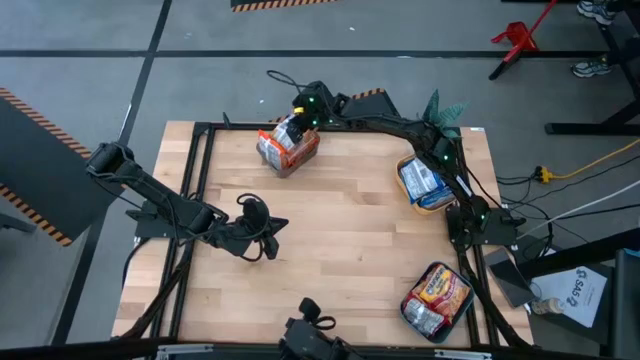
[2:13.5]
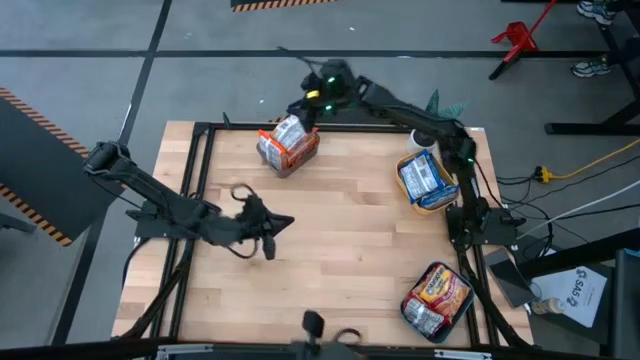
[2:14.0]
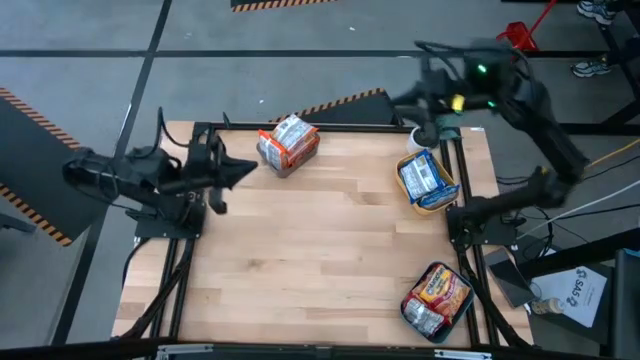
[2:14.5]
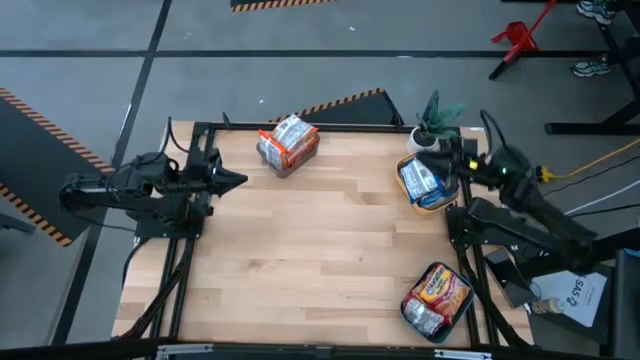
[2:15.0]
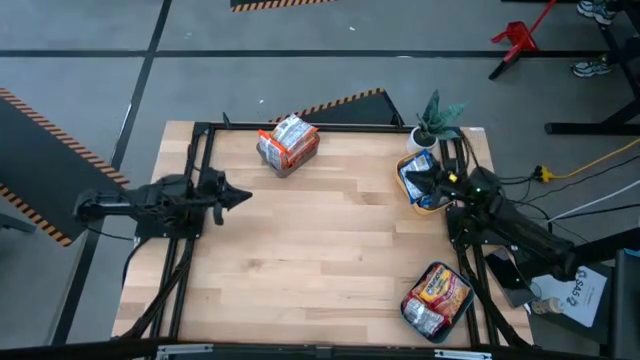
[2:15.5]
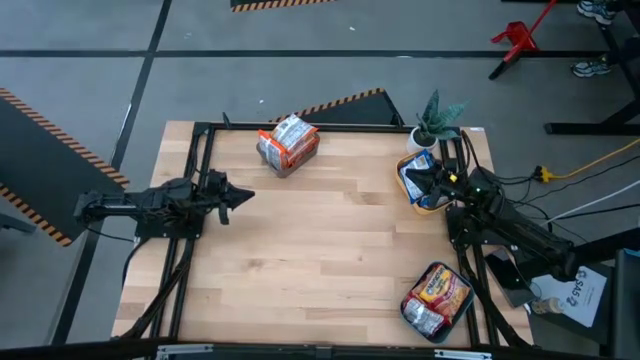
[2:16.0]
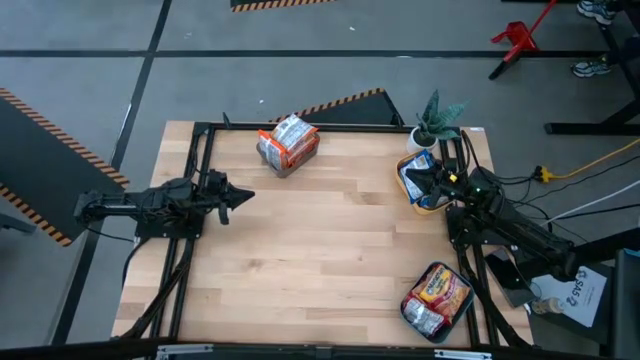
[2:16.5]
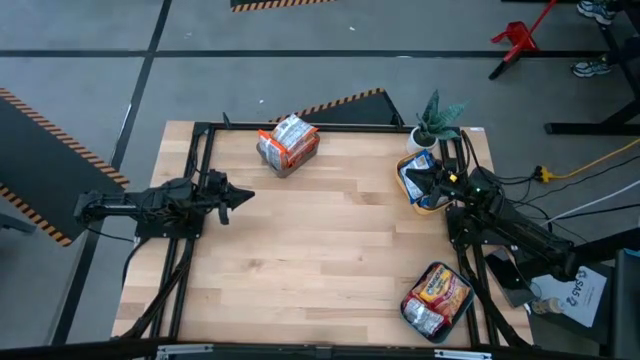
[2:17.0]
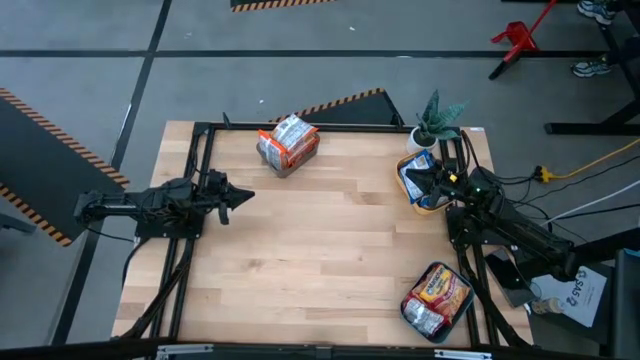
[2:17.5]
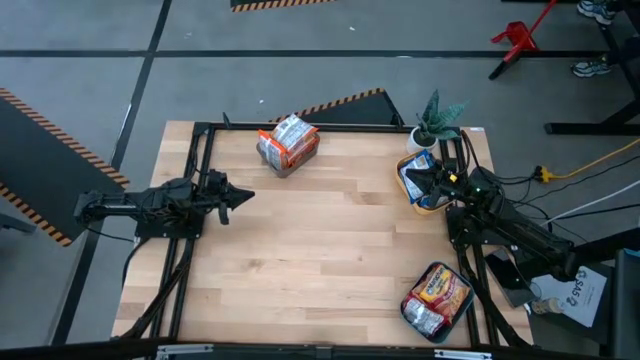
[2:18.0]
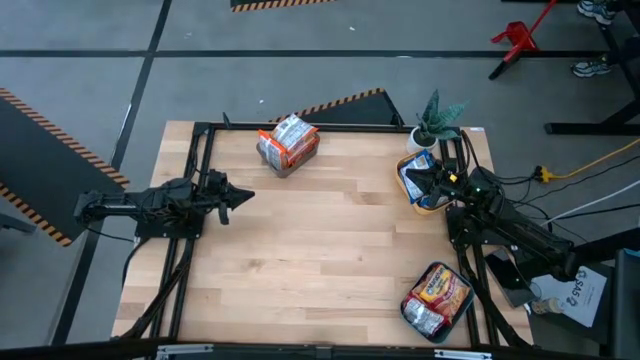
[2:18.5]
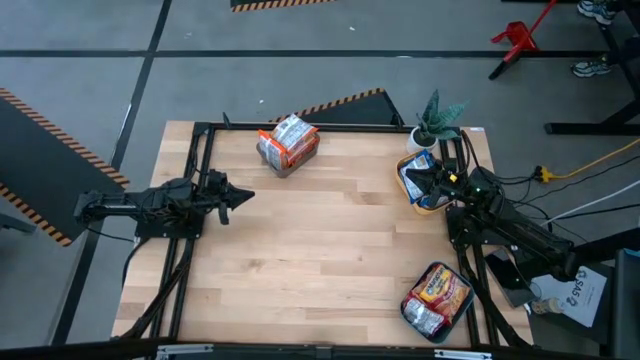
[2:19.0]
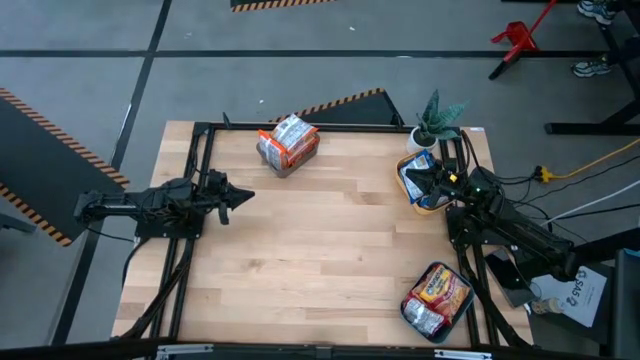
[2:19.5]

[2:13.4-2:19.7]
Task: Sort Maruchan noodles
Return to Home Position

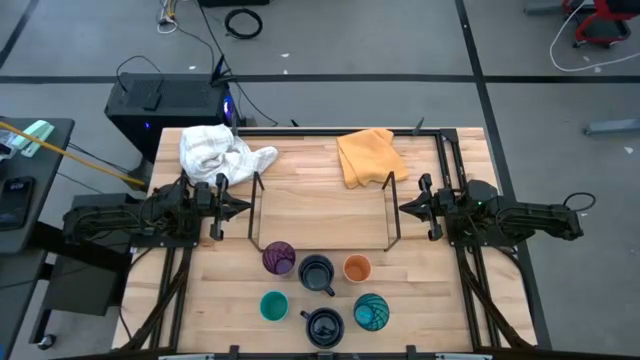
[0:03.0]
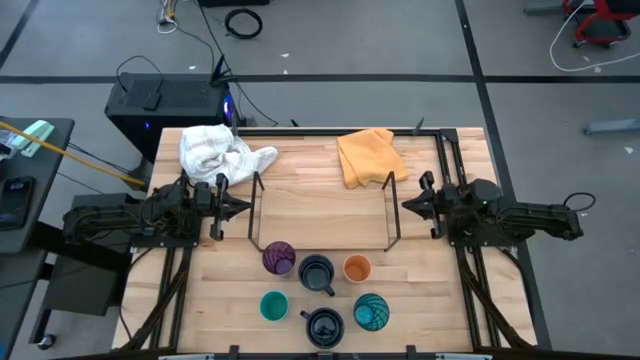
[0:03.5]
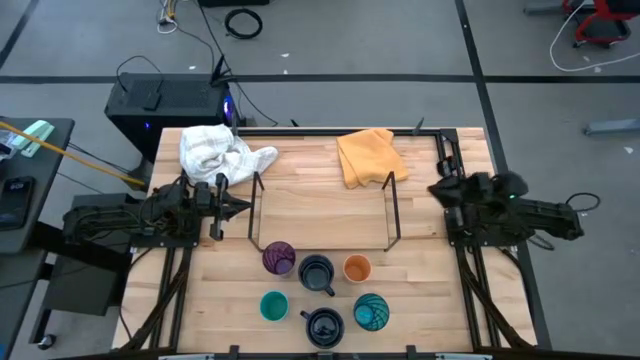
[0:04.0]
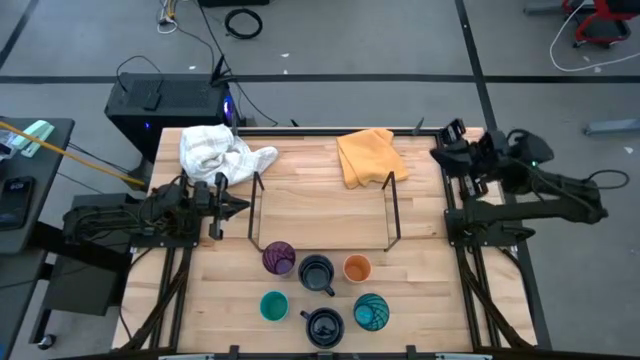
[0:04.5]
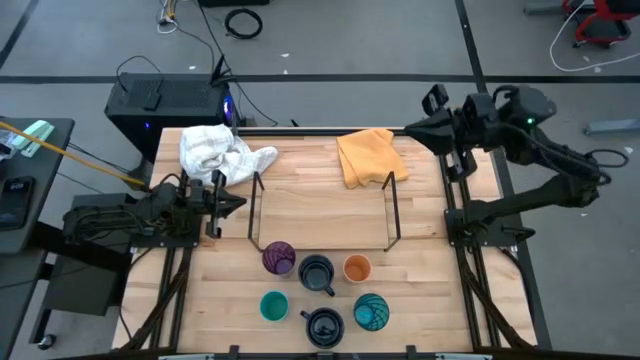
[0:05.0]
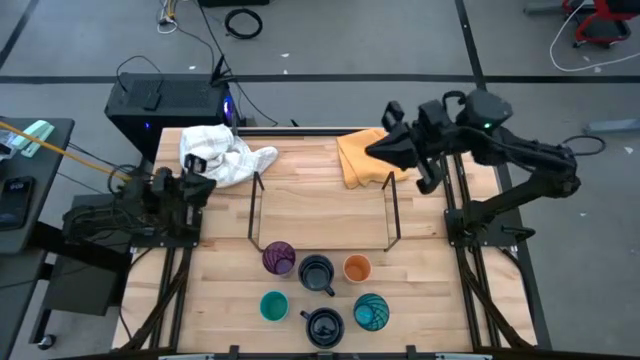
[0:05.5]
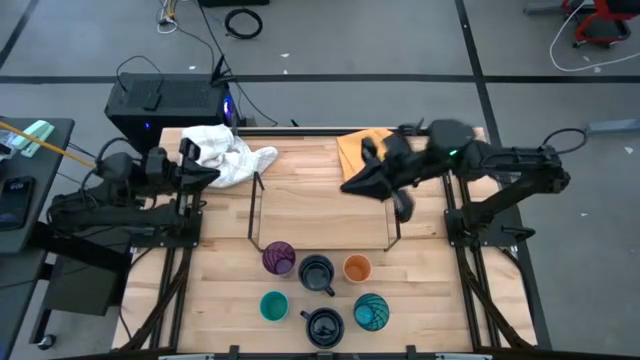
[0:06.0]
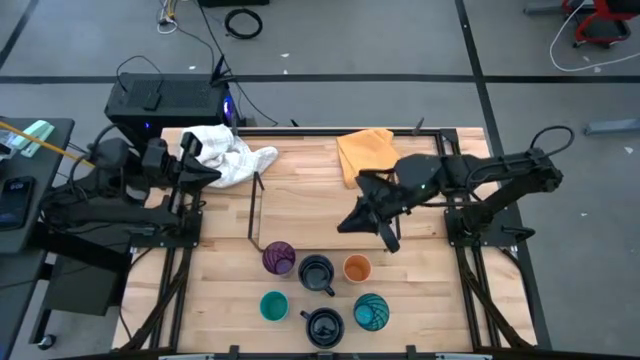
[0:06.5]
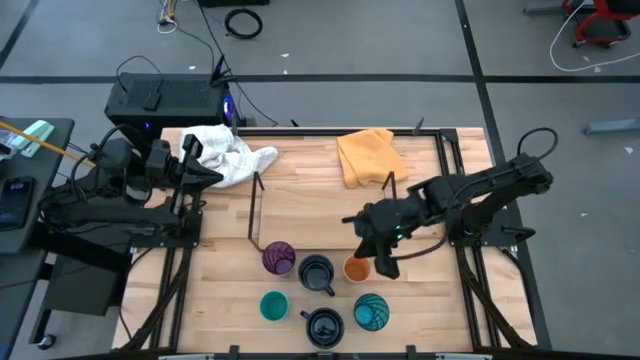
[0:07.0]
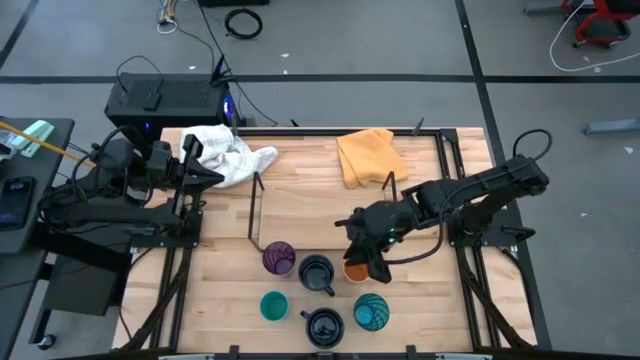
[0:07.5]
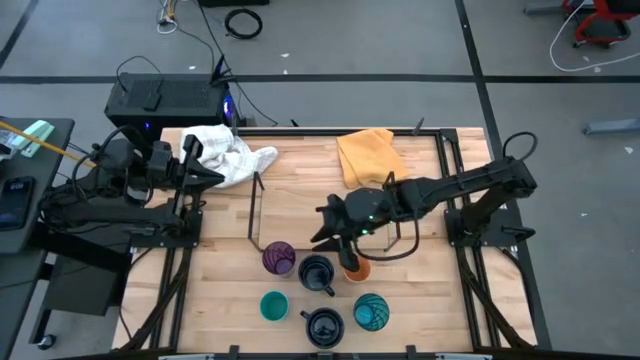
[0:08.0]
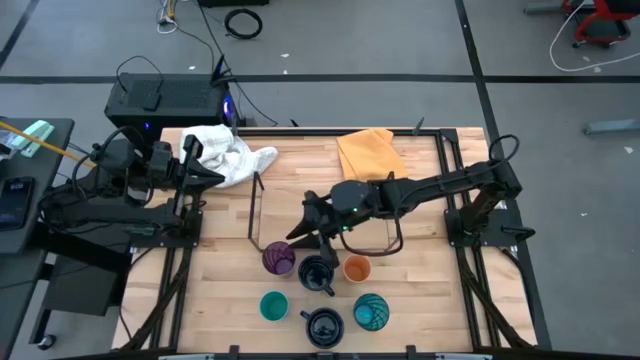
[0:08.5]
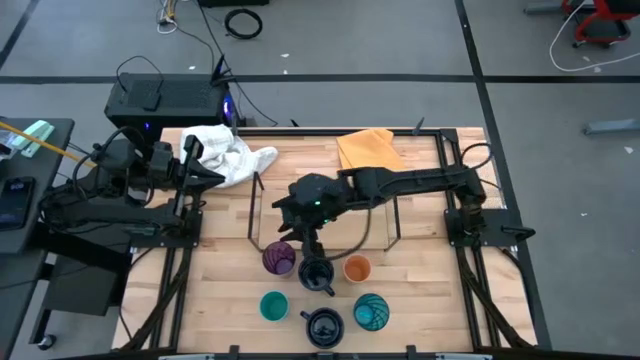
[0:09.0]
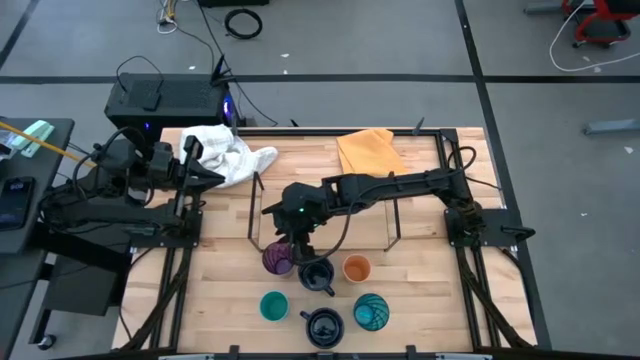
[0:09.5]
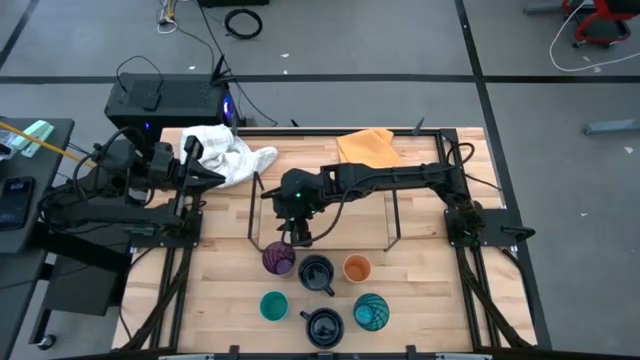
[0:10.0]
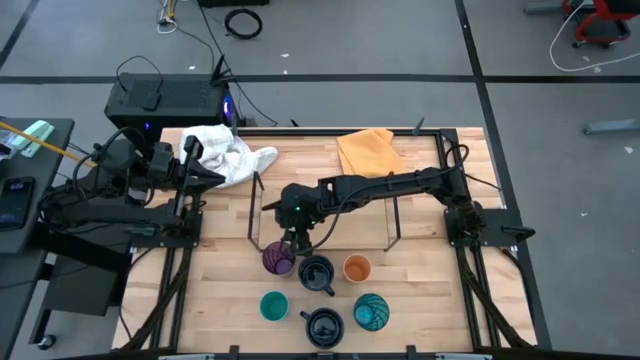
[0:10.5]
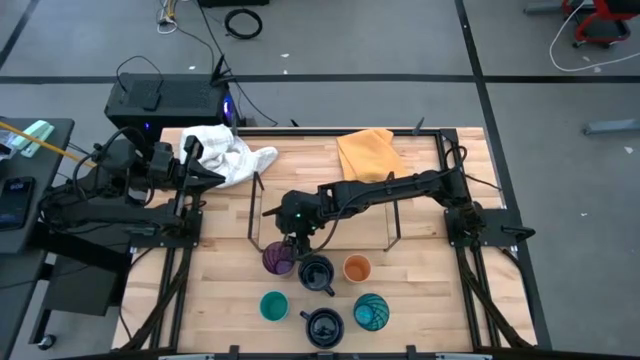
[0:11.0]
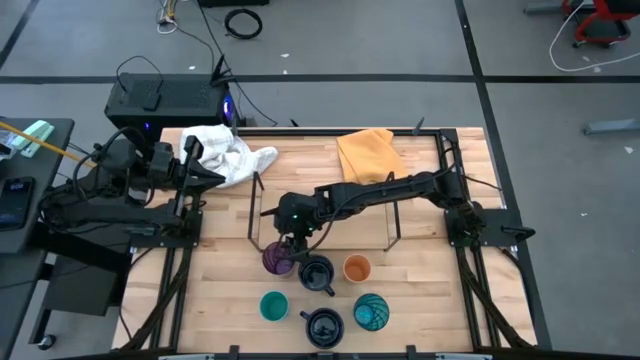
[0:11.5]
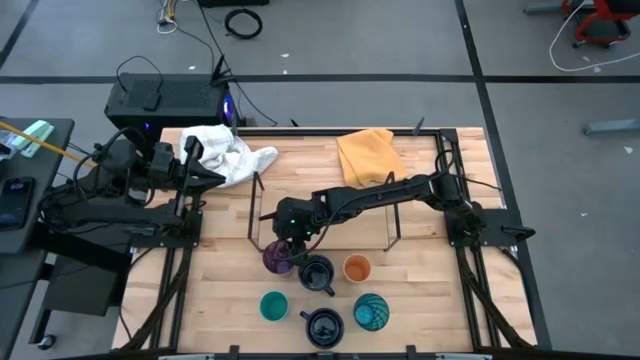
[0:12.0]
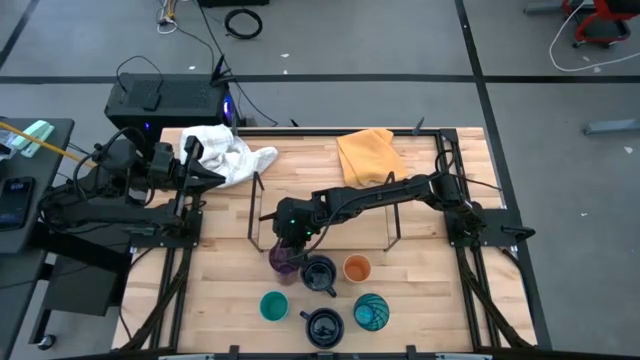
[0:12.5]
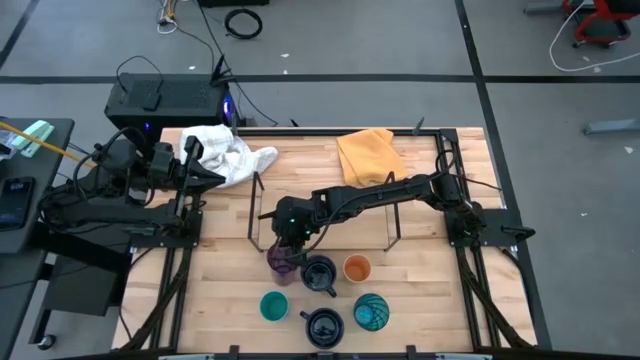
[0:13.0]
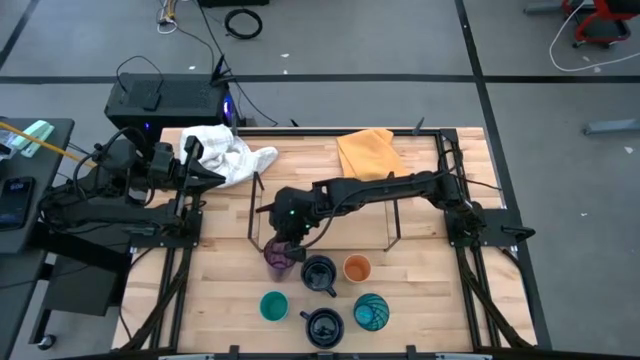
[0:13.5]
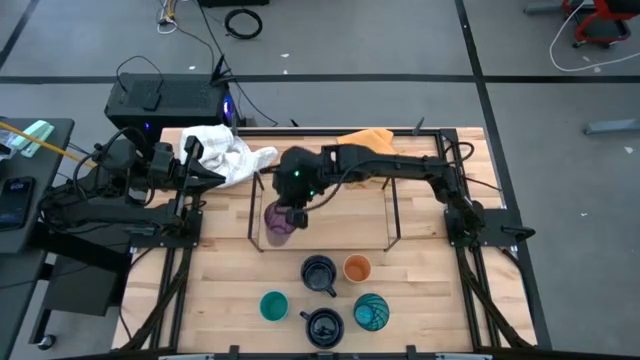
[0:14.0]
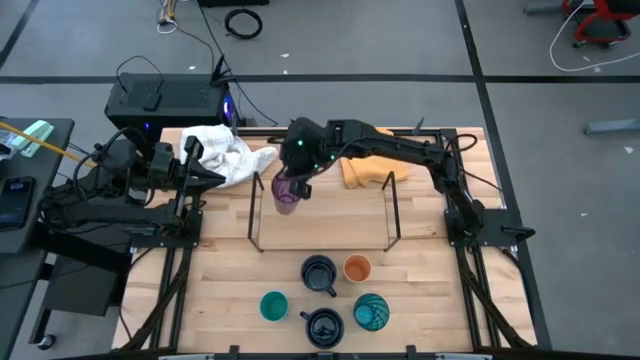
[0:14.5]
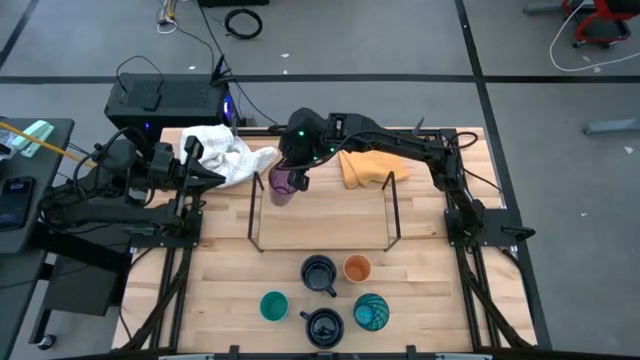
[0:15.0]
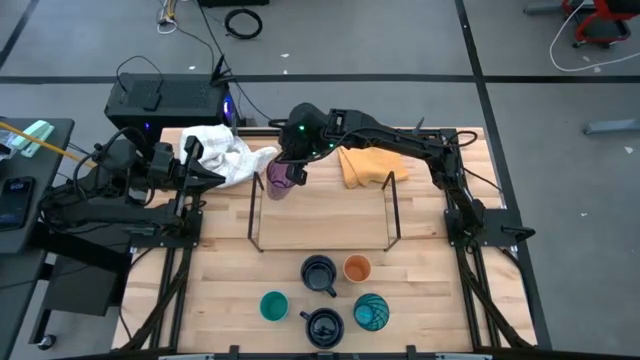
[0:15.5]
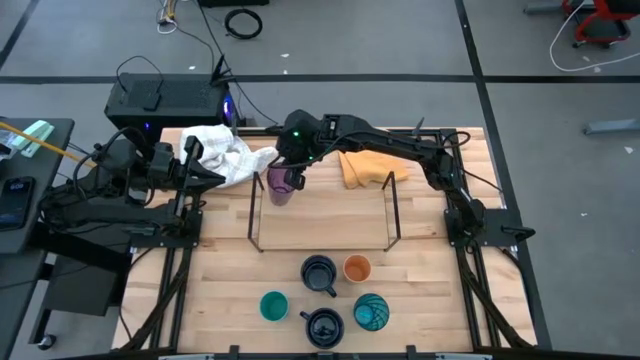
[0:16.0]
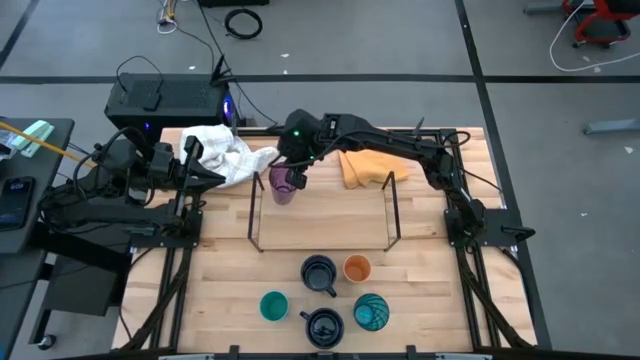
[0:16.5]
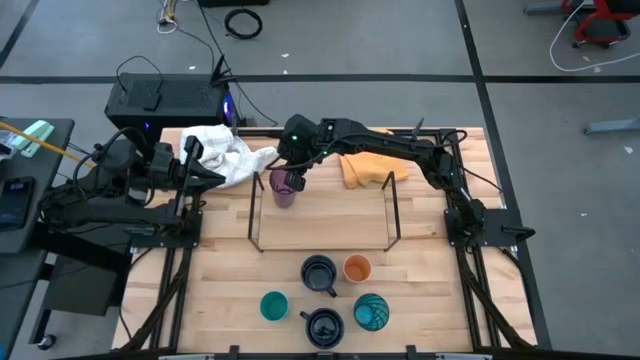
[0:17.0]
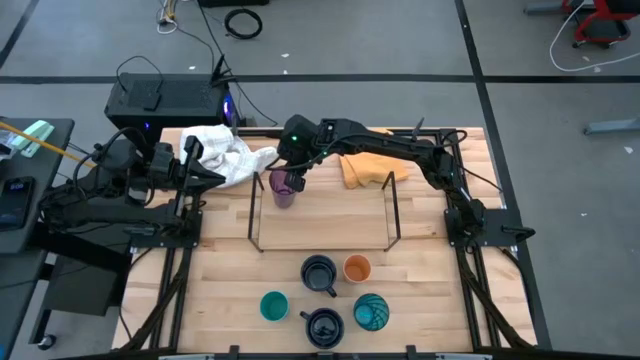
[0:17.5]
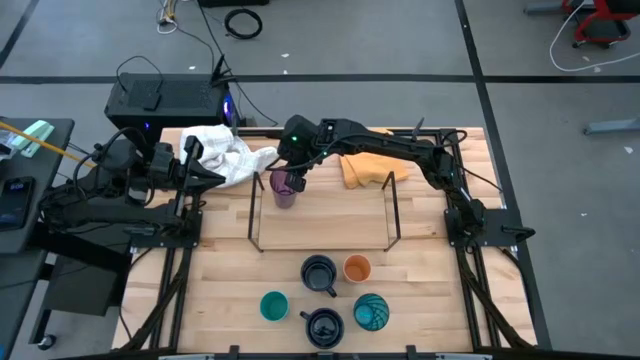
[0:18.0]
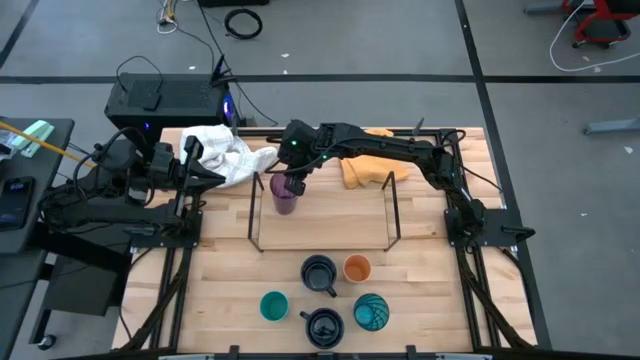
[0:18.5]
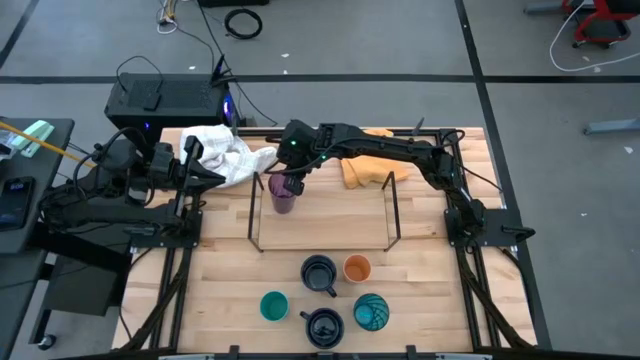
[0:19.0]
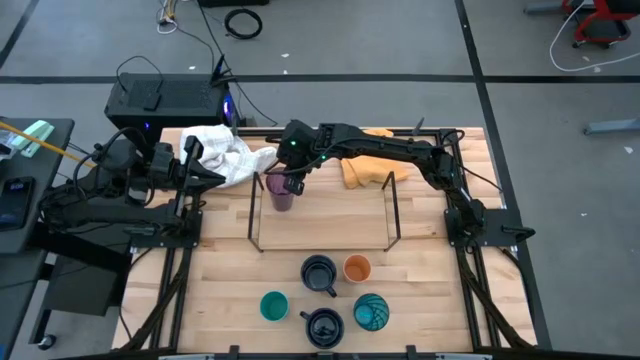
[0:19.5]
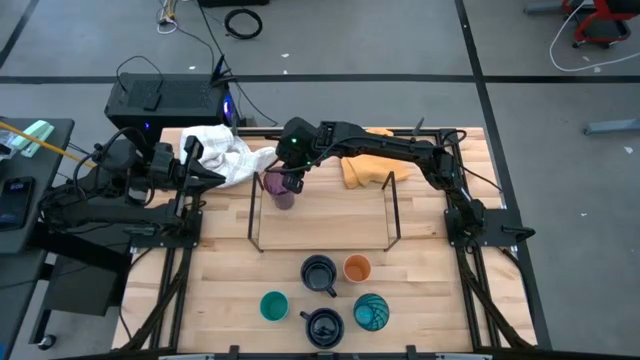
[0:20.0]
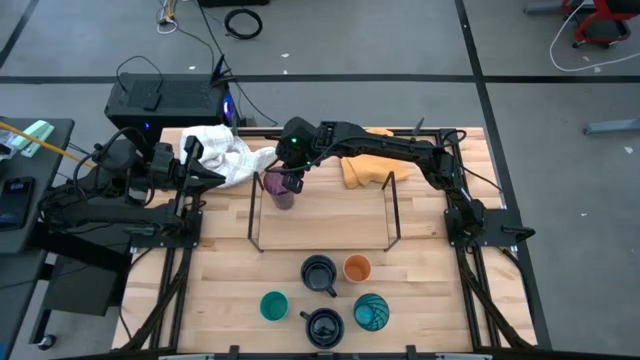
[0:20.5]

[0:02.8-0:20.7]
Task: Stack small to large cups/mugs on shelf
Put the purple transparent glass on the shelf
